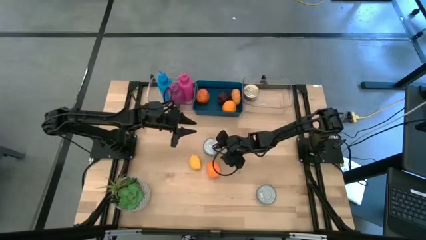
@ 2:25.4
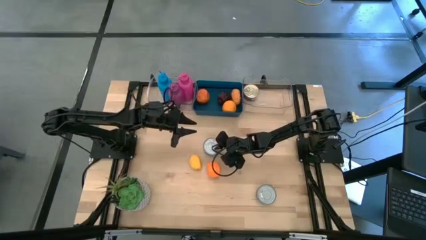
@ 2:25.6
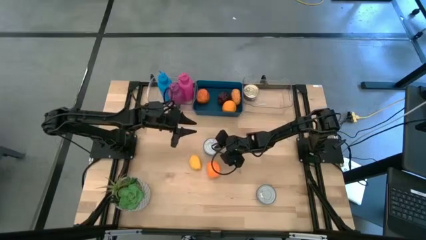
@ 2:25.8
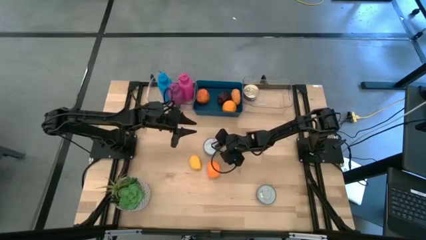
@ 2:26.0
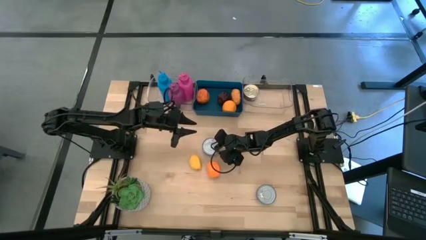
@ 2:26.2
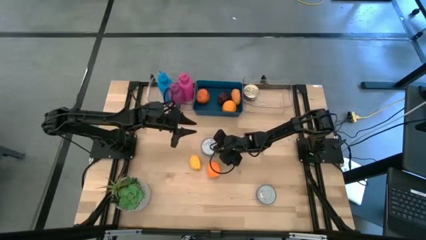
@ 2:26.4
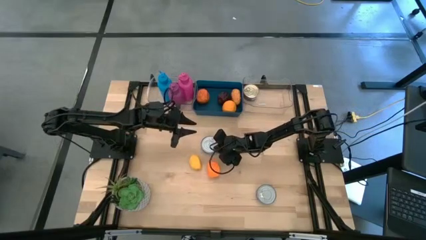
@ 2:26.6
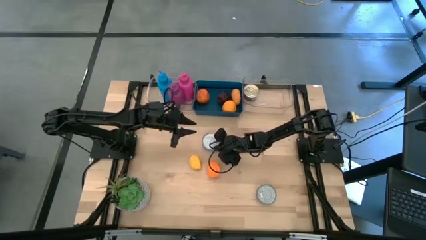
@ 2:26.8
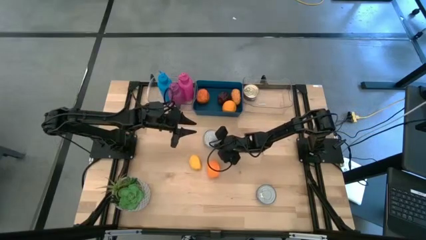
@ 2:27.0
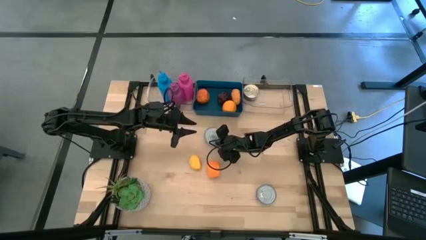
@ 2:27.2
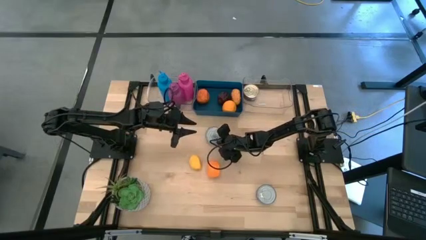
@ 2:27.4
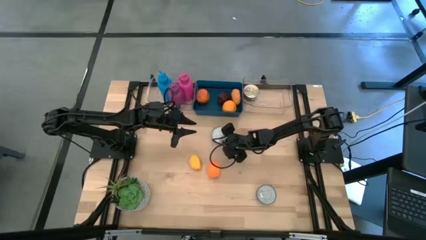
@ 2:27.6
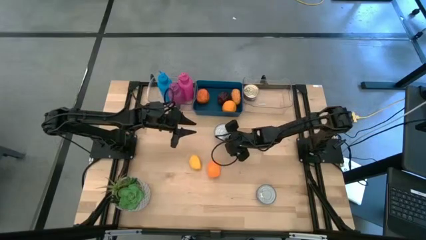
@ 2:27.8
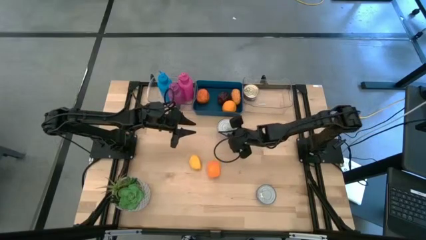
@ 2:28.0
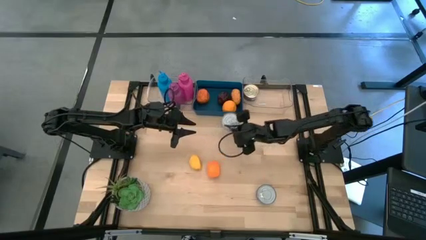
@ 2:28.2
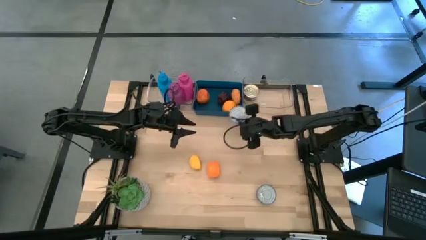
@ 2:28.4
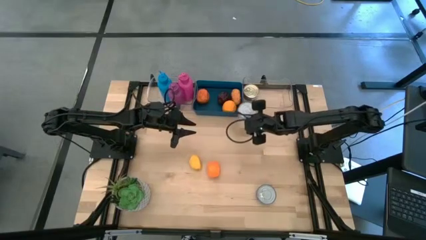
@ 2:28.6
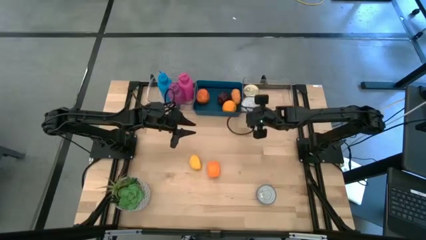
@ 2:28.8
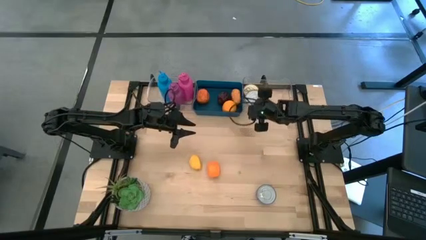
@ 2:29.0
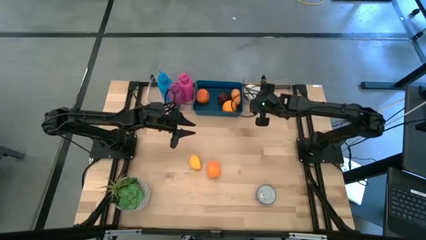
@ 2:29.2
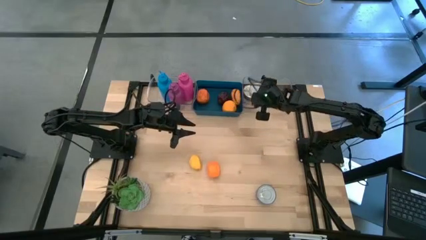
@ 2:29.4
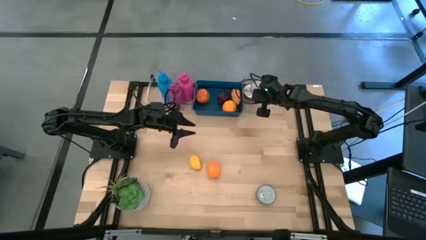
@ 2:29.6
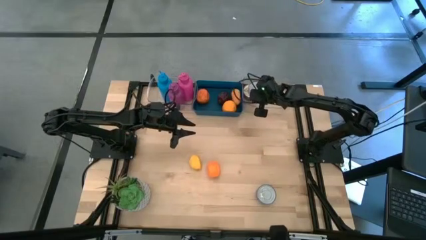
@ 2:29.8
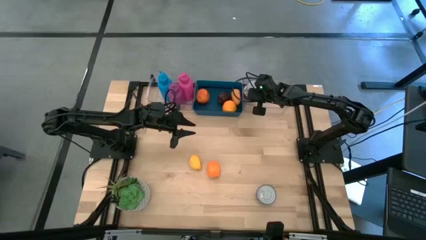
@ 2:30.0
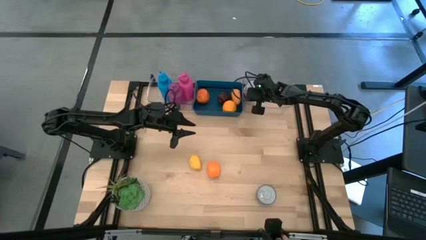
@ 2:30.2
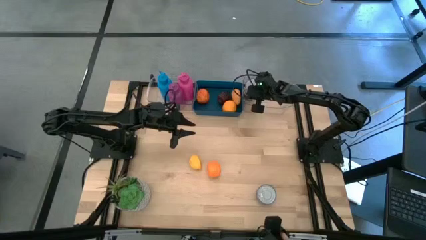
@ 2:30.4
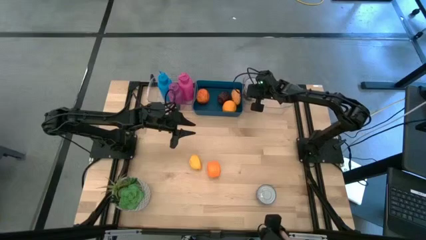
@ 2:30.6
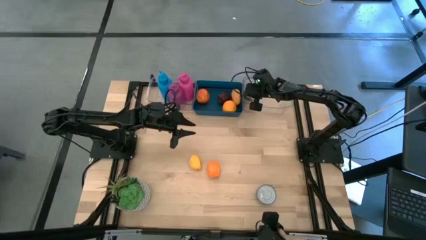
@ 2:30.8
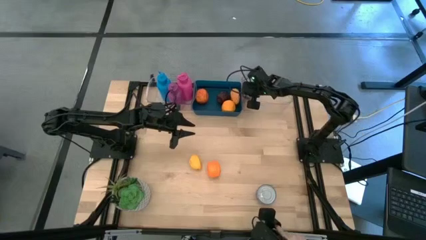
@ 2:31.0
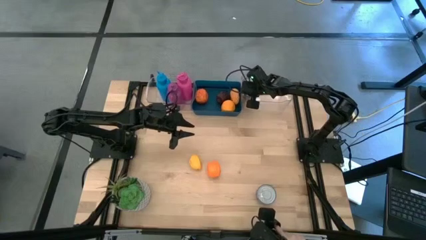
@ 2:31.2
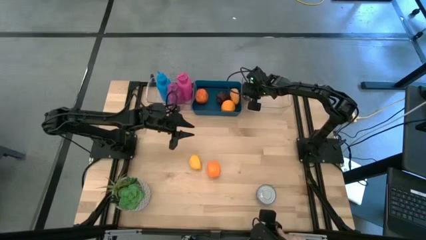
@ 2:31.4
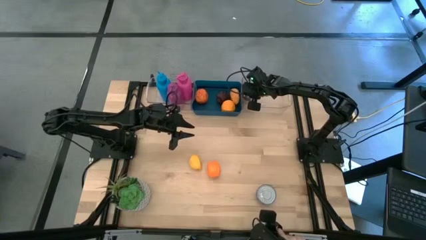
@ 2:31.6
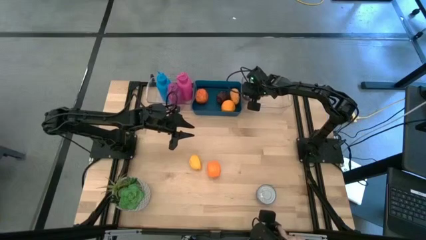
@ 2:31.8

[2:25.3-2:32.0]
Task: Pick & Place Food Item
Stack the yellow blue can on top of the blue pink can in the right transparent bin

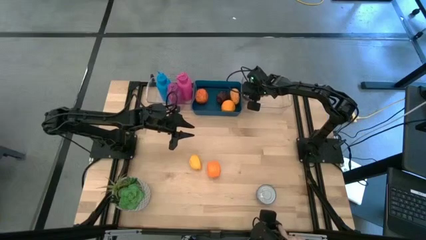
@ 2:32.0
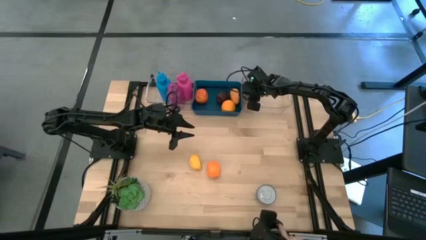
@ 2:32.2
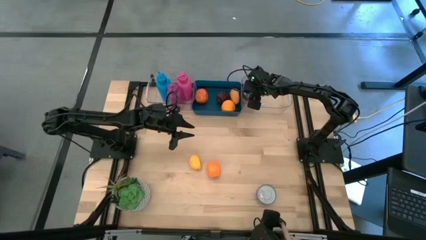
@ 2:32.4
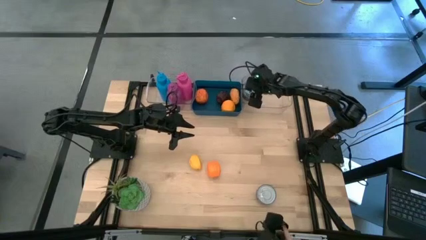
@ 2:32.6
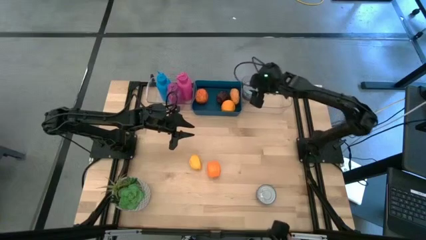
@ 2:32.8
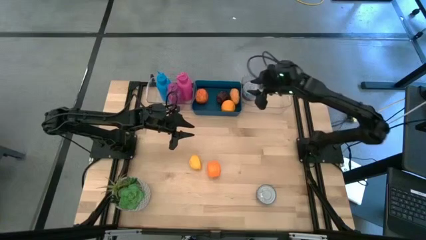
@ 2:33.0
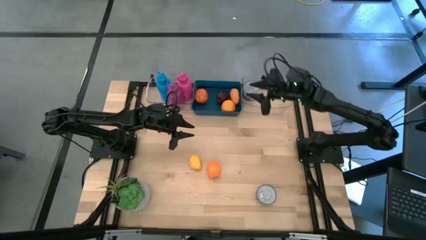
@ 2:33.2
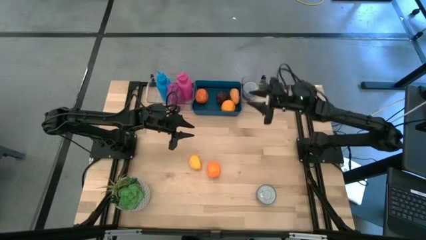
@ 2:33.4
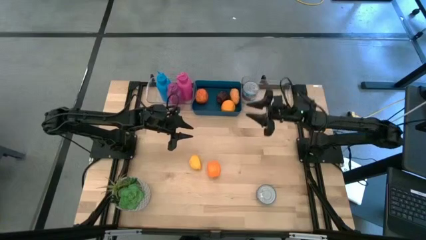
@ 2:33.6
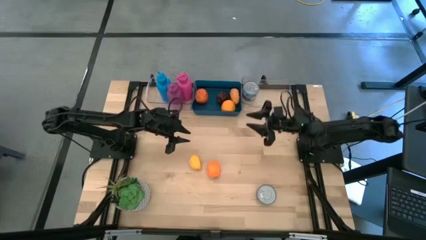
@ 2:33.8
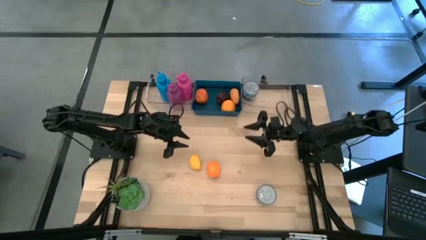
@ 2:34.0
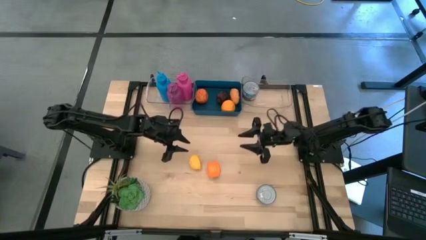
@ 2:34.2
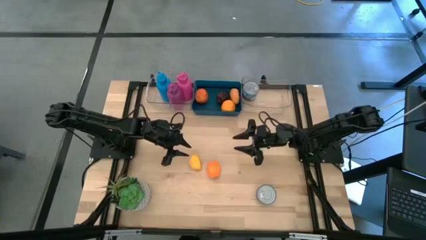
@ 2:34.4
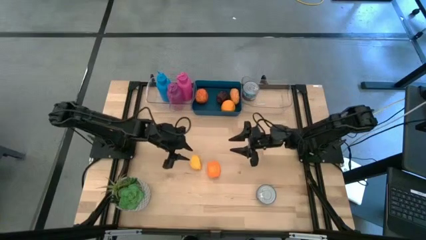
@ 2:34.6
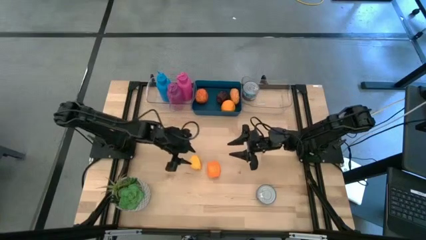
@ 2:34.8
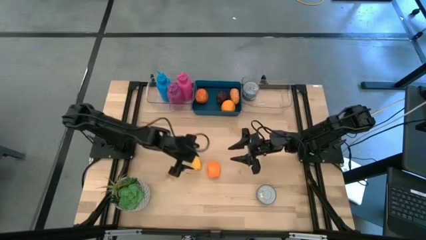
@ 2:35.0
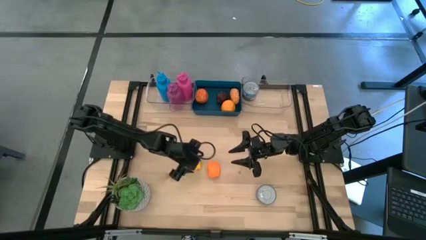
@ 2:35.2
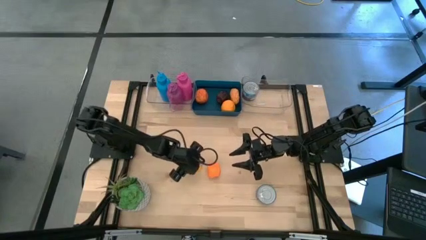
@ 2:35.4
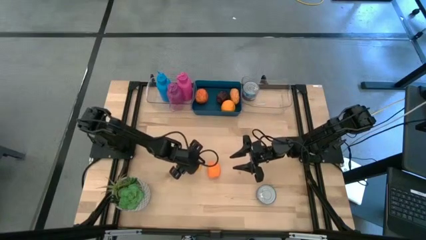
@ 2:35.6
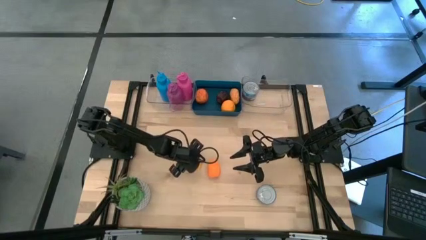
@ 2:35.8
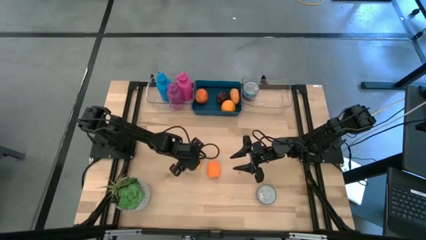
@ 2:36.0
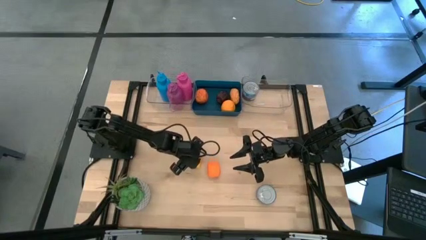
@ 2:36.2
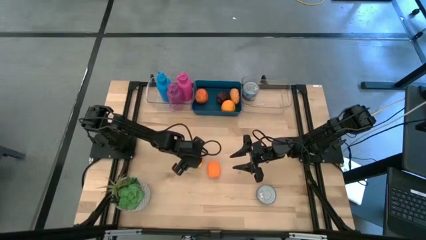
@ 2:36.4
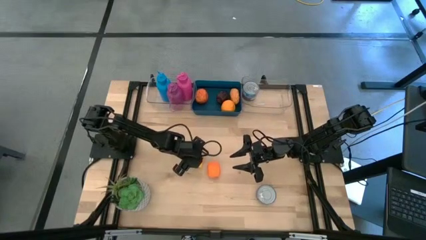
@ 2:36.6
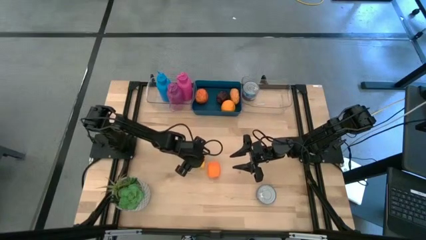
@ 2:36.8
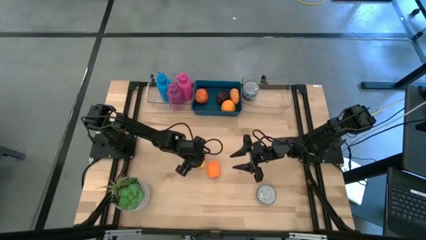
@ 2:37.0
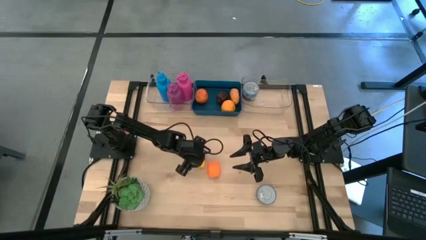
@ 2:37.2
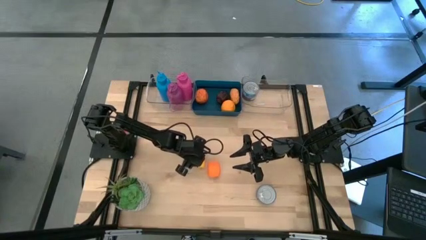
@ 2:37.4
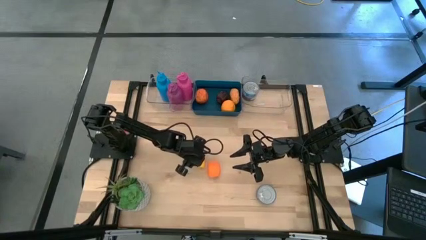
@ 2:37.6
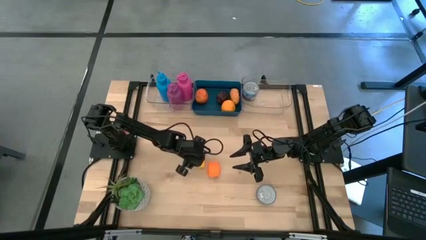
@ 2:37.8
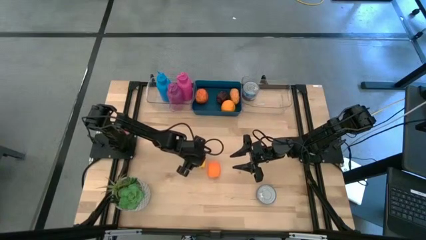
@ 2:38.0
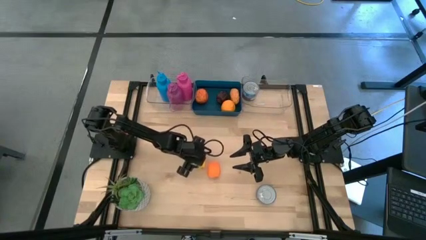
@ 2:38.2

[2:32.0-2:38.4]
Put the mango into the blue bin
